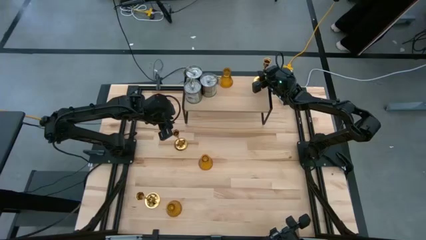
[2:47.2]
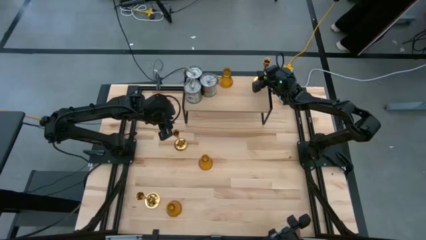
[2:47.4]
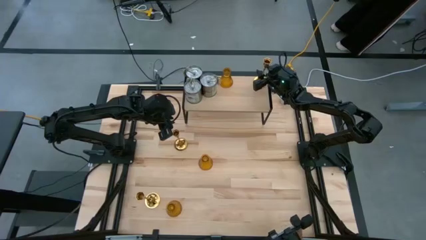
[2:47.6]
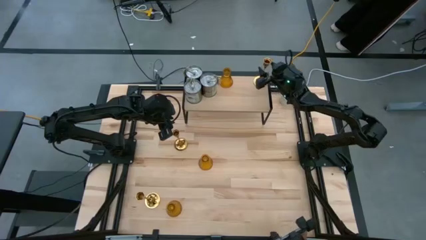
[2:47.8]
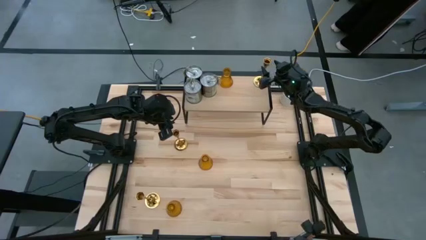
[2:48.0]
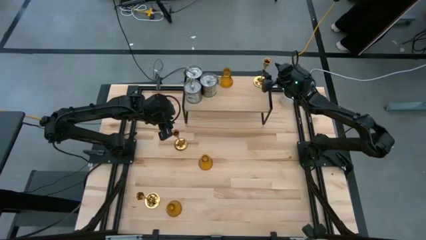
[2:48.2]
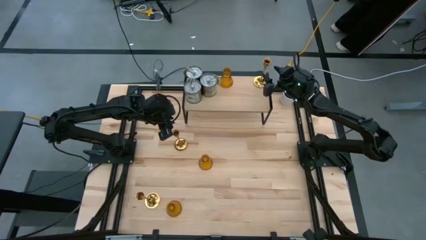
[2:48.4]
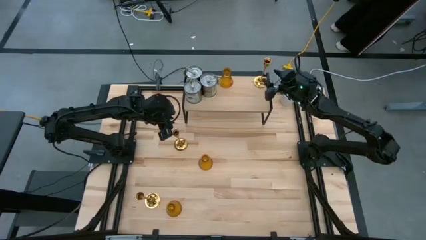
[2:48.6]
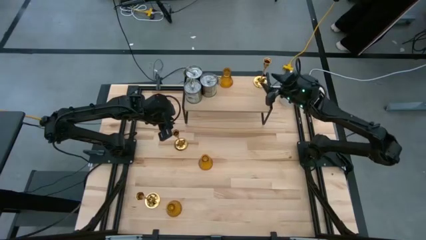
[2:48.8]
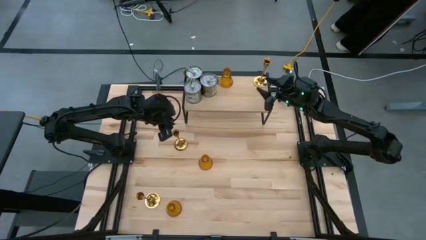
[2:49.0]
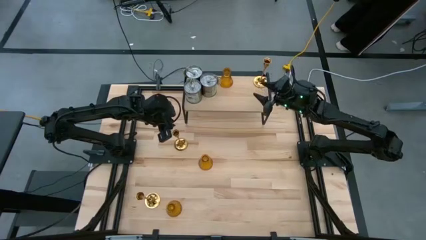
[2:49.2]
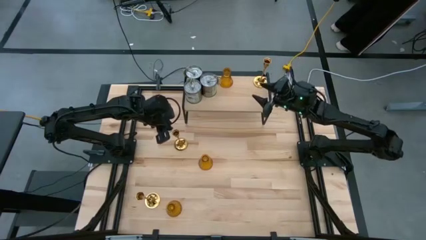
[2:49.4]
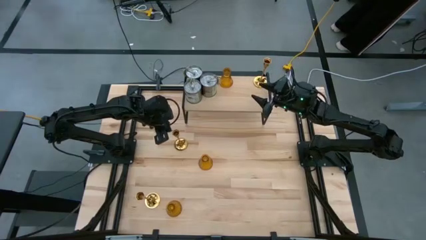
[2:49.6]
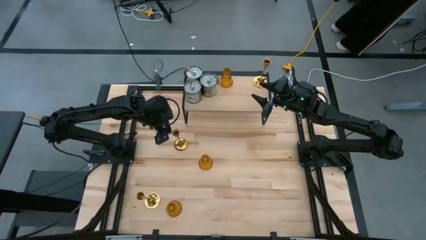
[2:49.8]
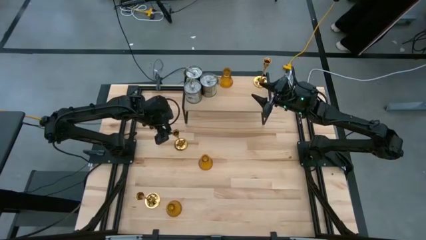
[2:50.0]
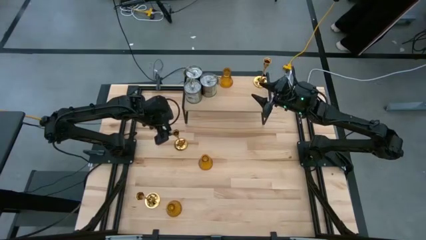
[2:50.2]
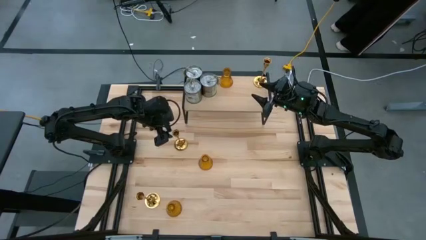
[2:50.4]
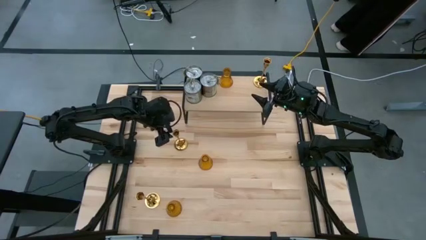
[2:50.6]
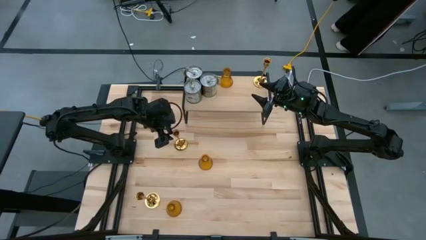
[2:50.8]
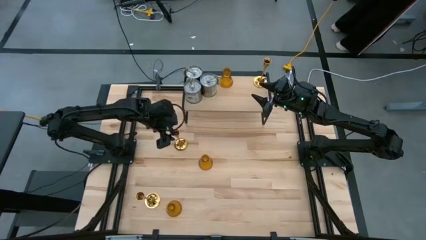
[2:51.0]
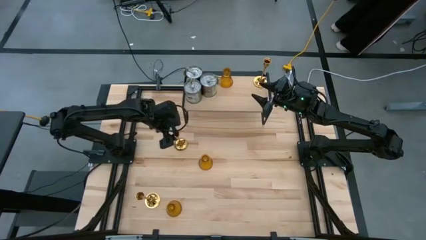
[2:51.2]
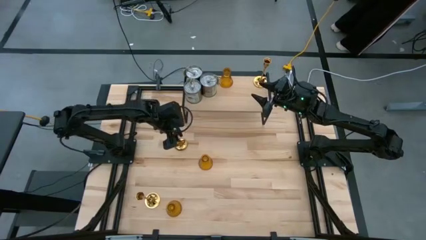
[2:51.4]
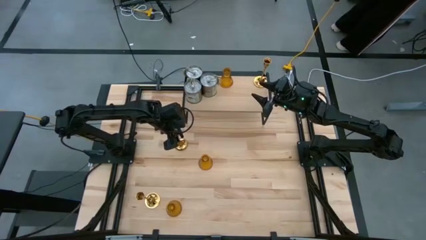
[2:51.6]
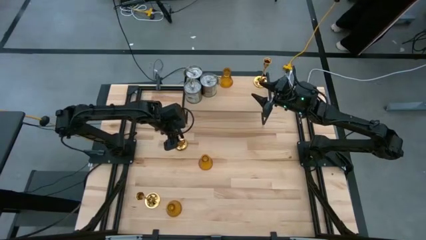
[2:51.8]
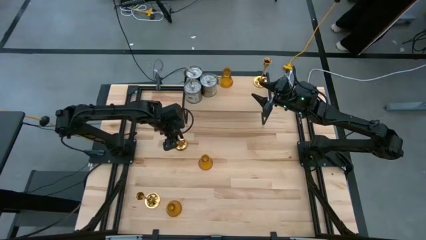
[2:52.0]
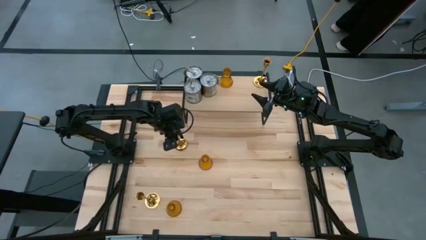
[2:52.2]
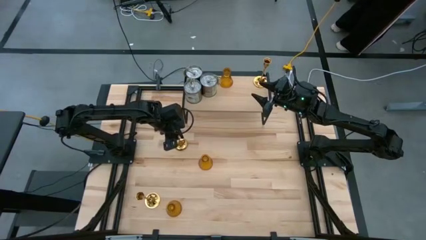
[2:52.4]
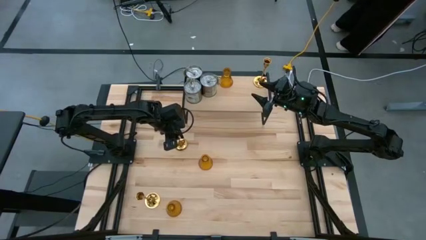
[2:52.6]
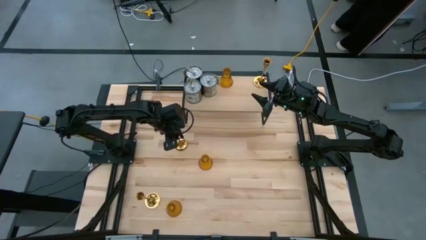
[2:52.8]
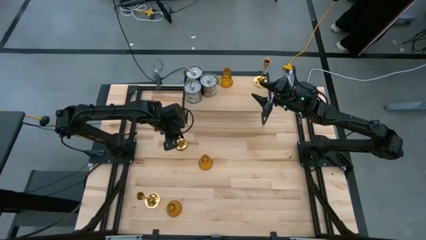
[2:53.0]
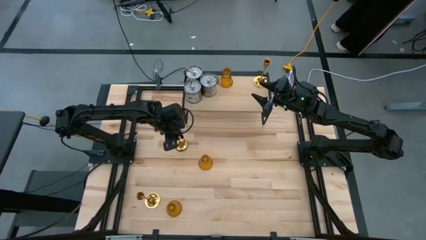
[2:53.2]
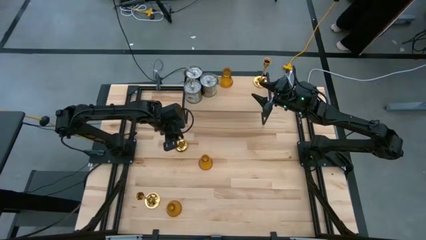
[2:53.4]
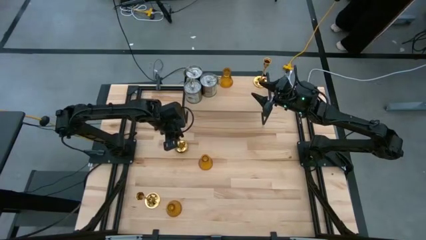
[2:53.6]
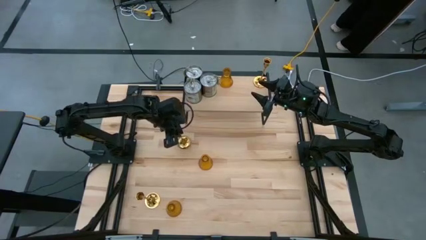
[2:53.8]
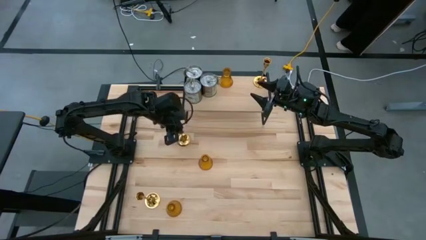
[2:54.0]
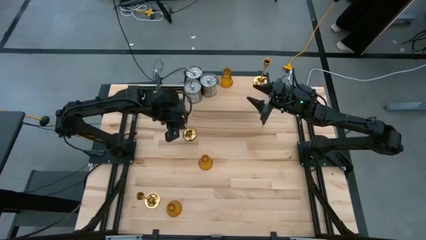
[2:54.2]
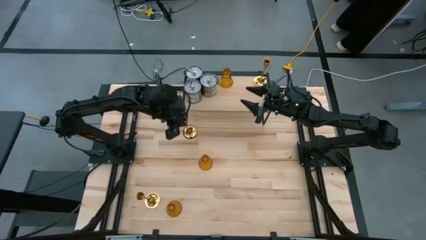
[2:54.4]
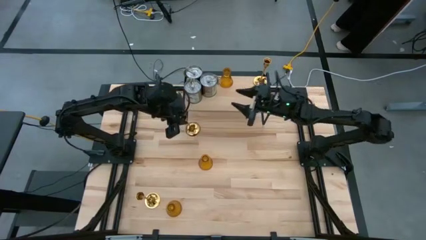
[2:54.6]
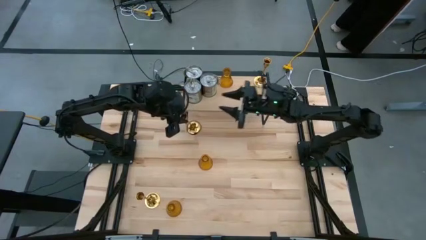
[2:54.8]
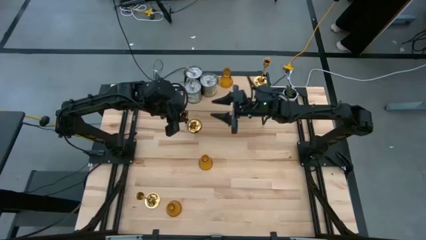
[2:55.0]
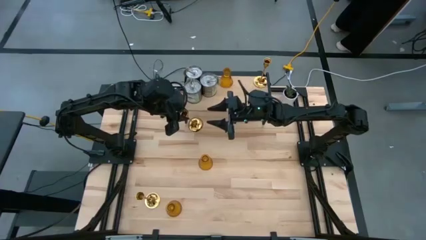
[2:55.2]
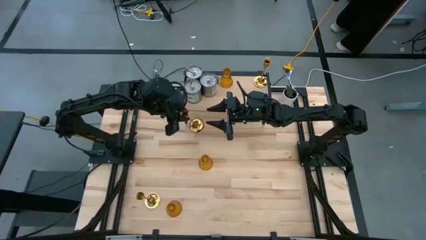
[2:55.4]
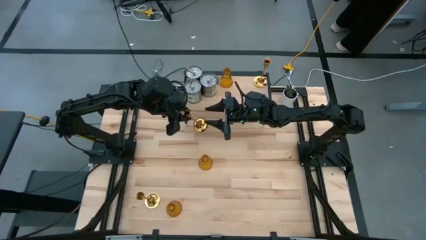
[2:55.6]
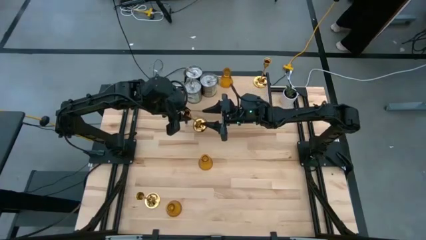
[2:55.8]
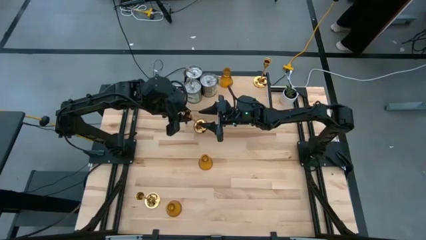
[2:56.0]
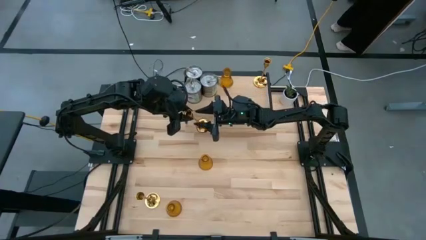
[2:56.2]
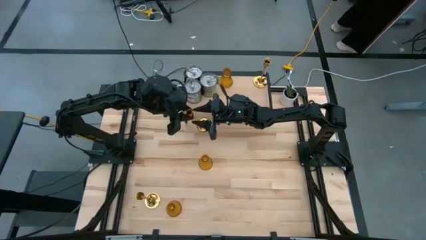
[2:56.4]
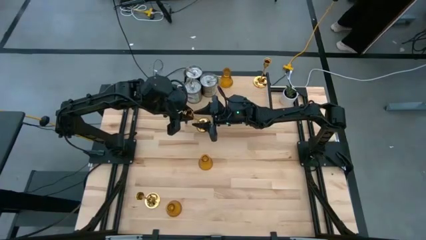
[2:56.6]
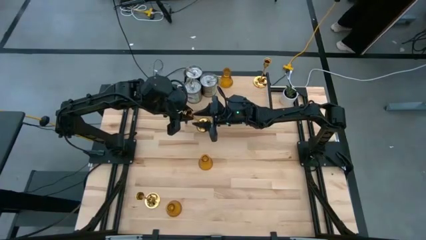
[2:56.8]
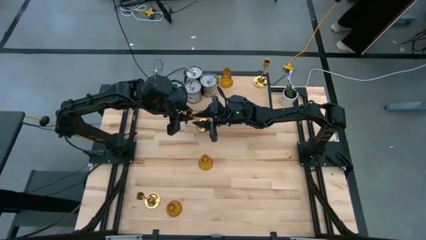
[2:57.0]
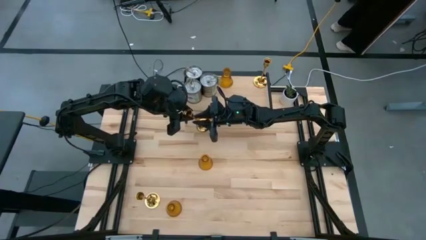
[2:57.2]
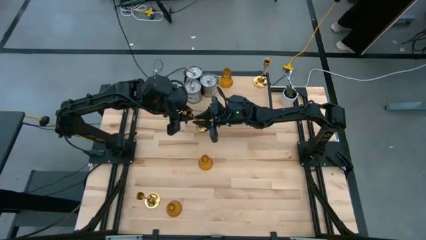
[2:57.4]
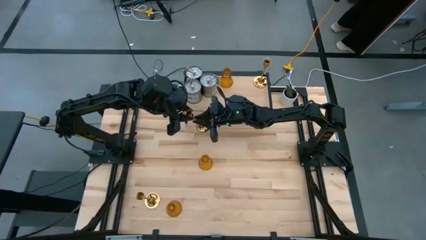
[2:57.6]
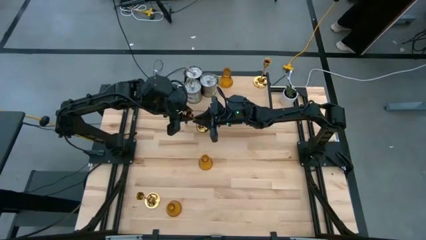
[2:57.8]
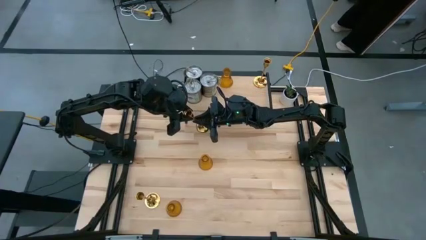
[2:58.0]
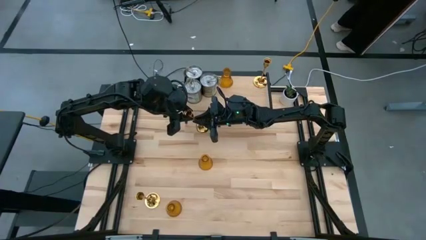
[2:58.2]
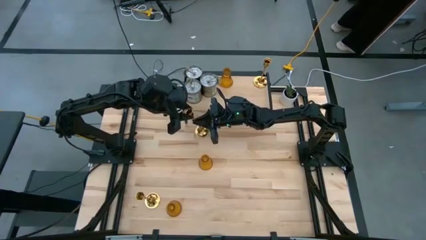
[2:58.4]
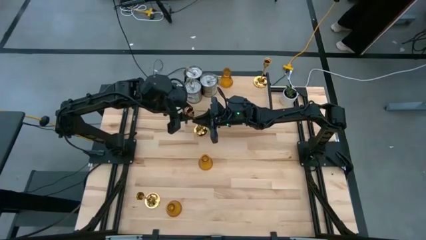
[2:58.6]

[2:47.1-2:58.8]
Task: Pick & Place candle stick holders
Put the top gold candle holder on the shelf aligned with the other gold candle holder

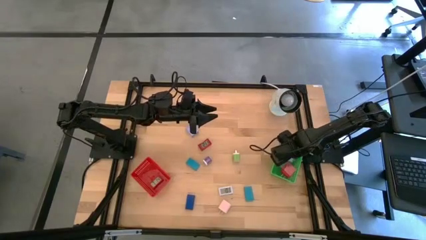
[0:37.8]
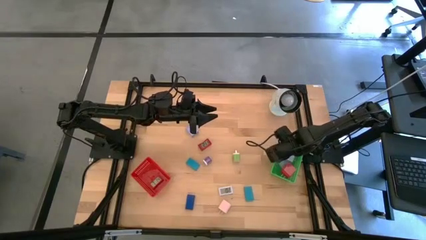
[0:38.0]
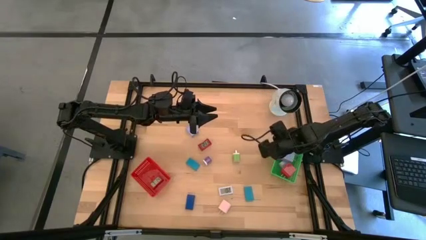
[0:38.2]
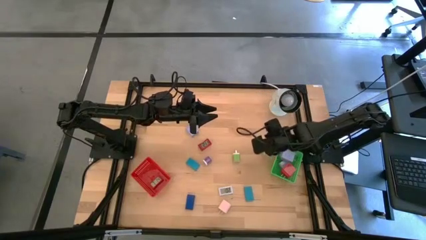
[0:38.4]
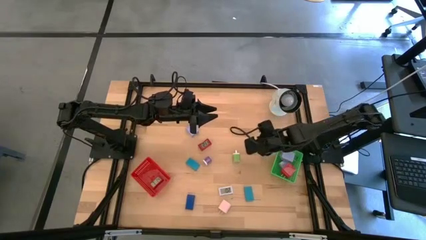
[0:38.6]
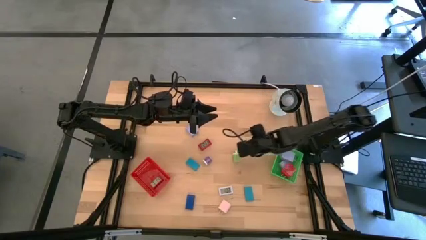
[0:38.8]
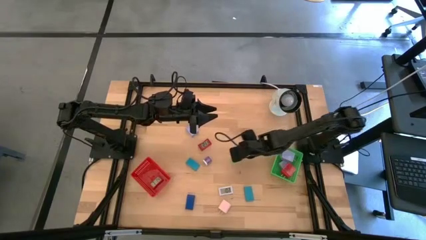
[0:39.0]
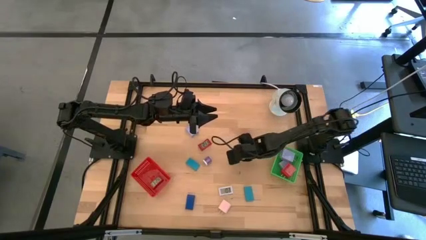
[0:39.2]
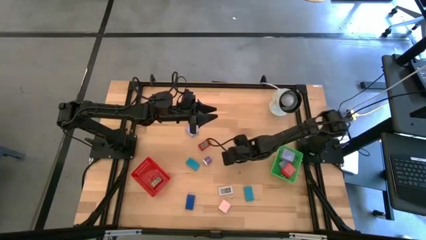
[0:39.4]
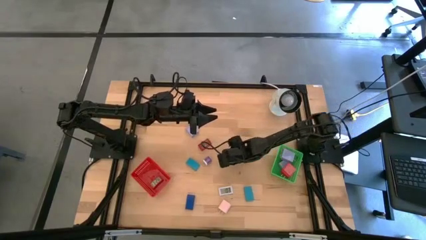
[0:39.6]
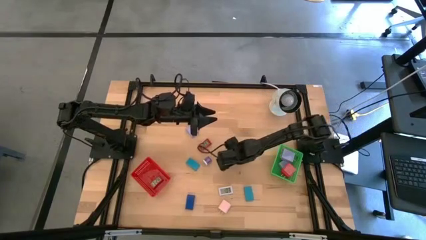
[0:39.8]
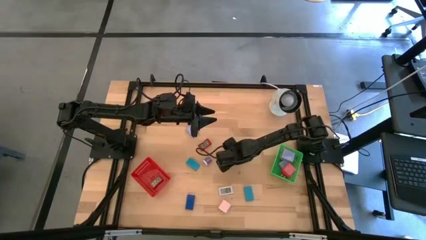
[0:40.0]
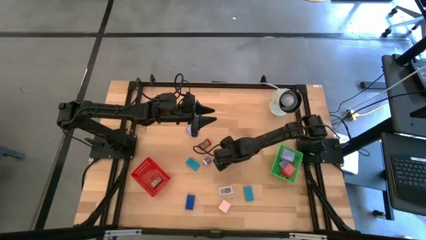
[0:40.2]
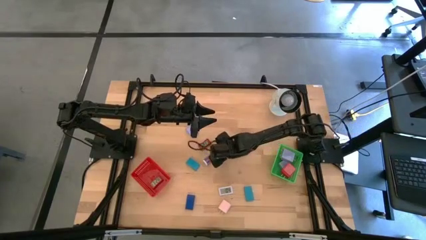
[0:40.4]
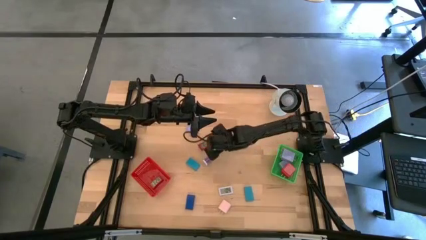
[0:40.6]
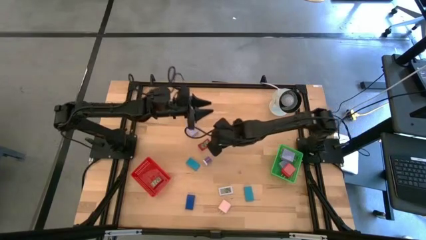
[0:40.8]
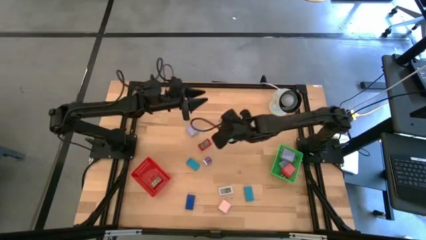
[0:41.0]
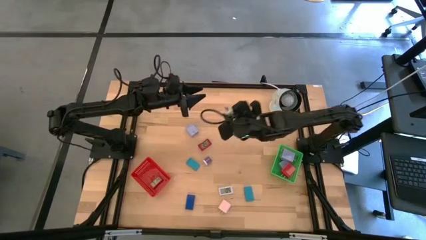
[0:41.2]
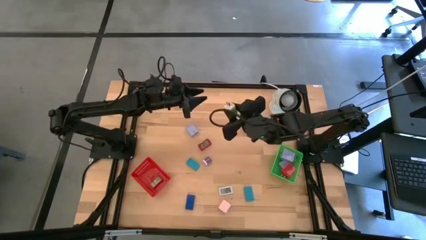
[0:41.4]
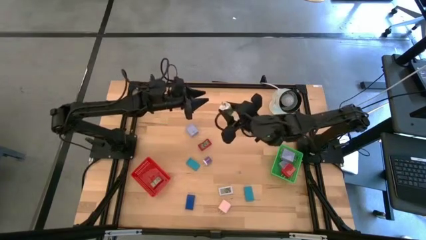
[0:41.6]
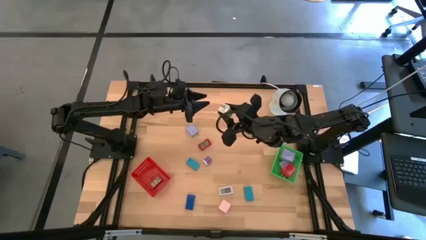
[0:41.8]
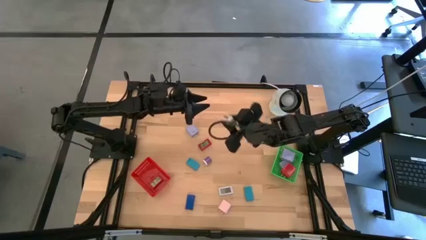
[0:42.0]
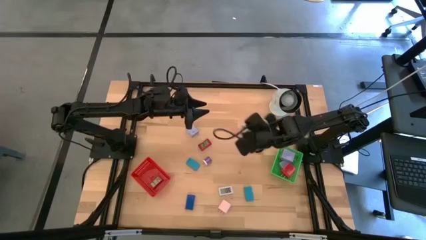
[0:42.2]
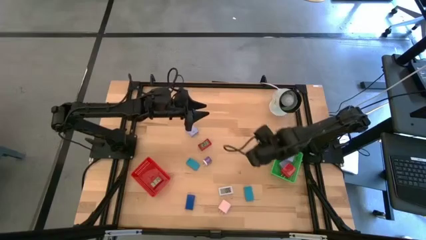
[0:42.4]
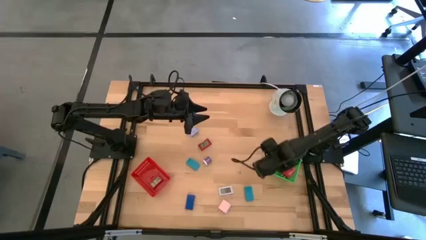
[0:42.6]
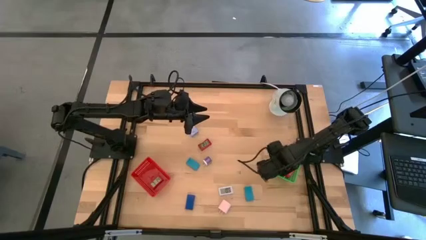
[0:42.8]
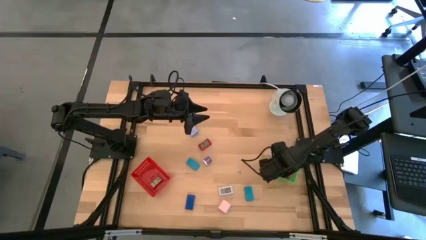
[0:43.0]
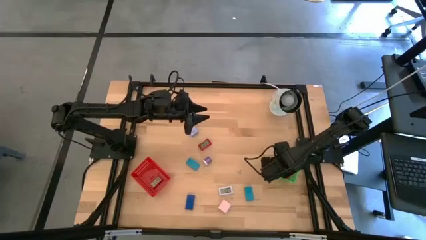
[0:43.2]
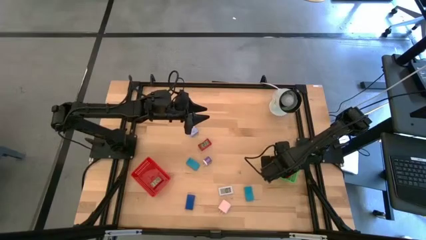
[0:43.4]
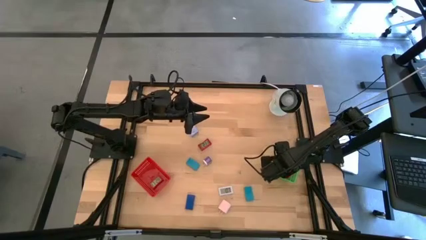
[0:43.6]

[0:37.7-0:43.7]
Task: Pick & Place Office items
Put the green power adapter into the green bin
